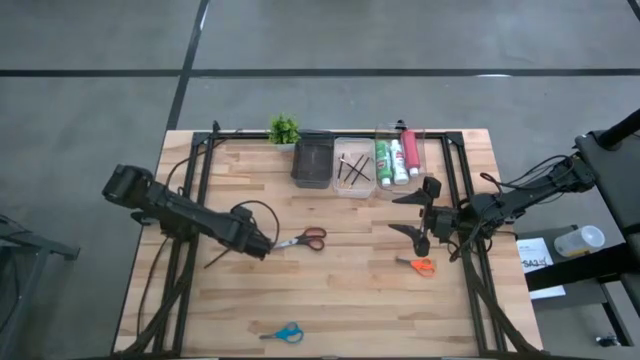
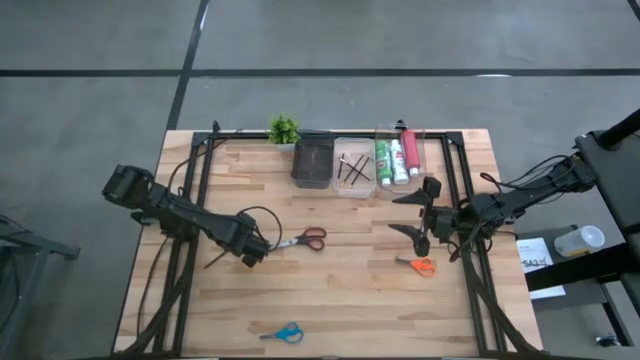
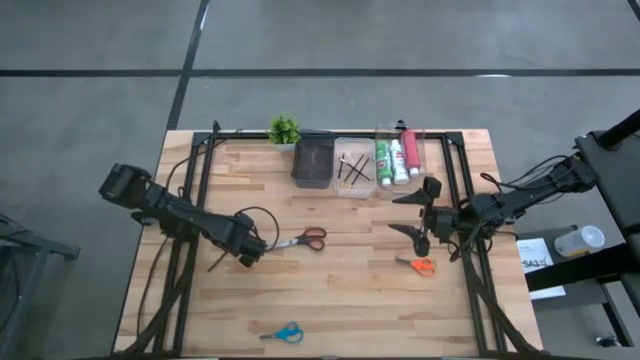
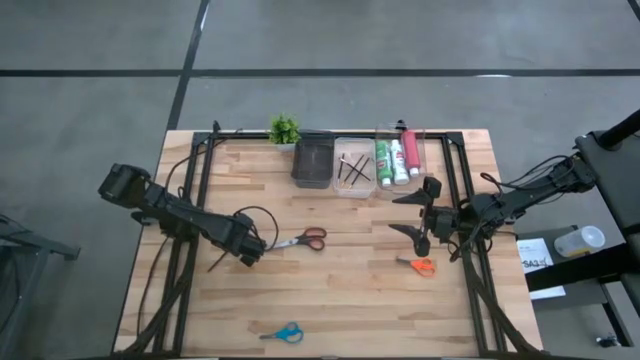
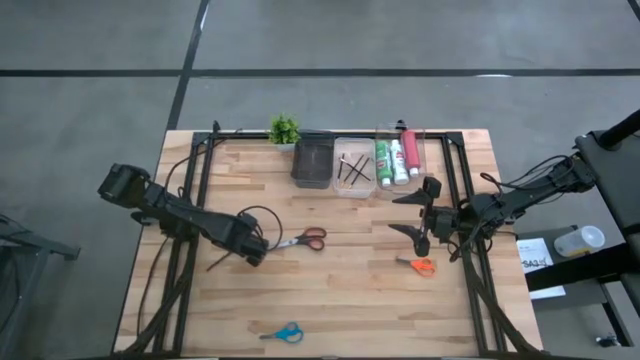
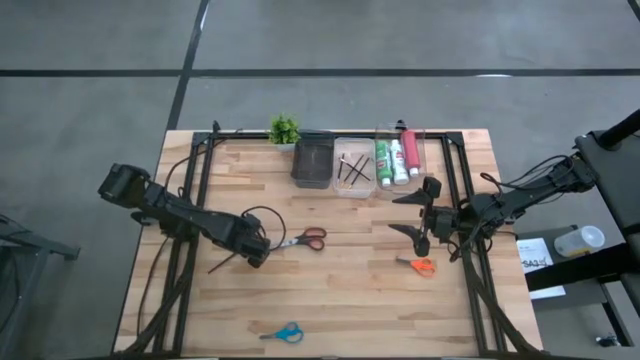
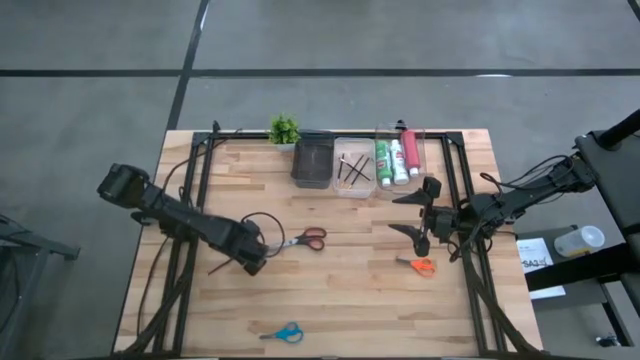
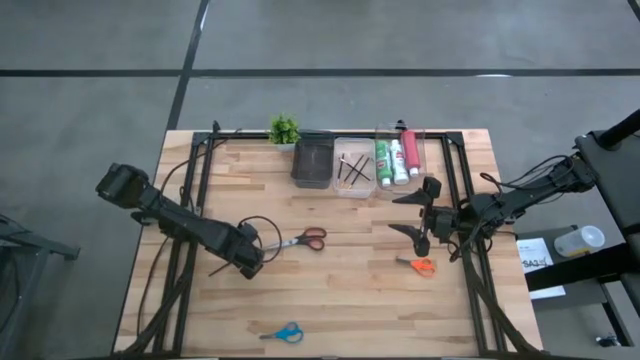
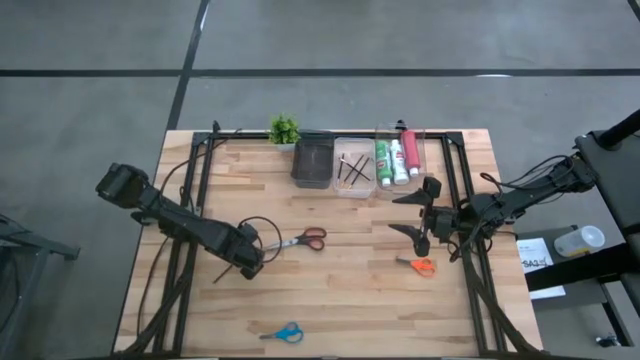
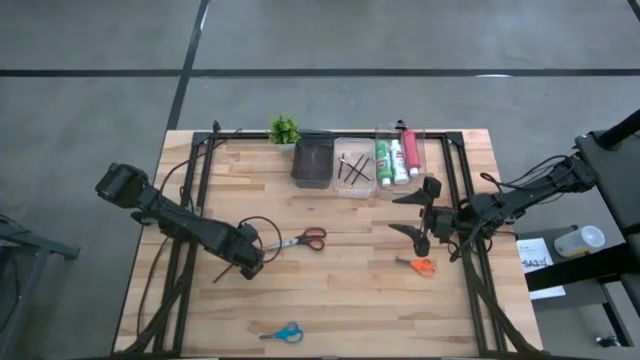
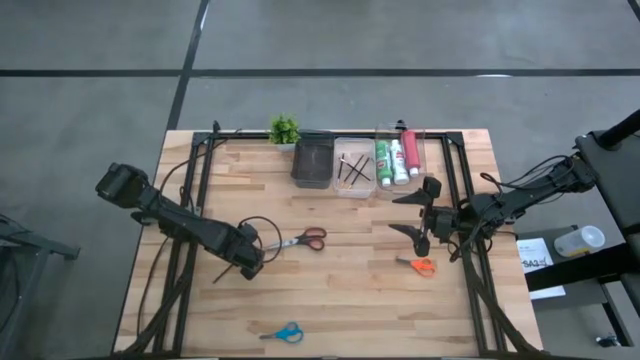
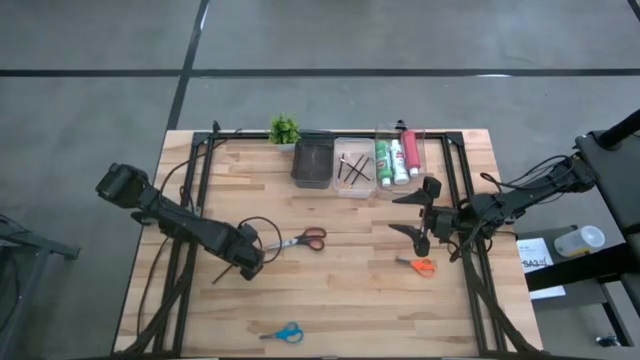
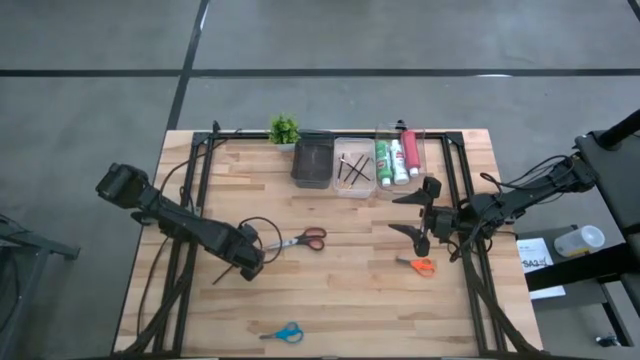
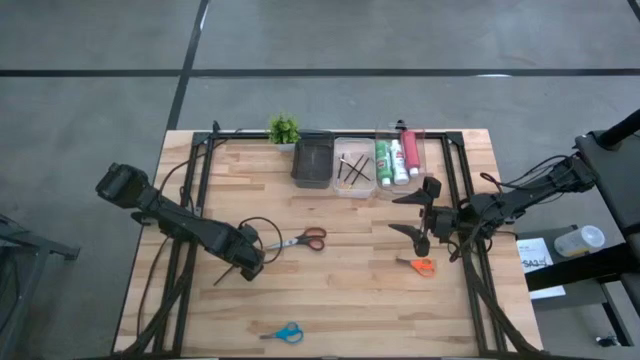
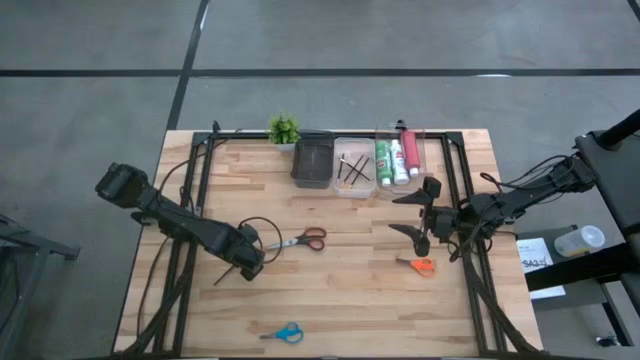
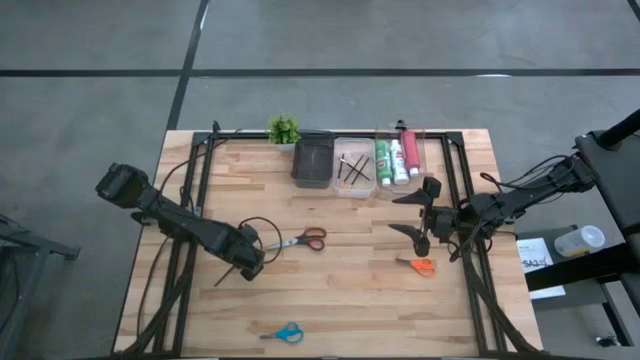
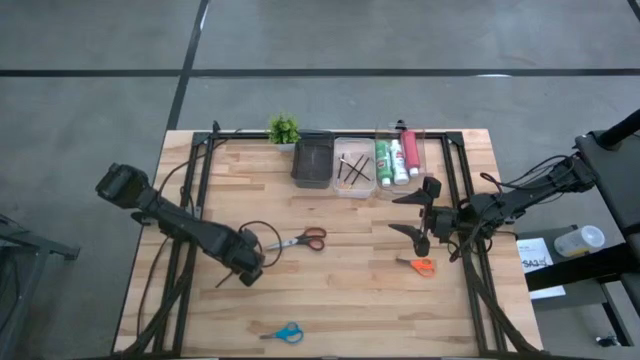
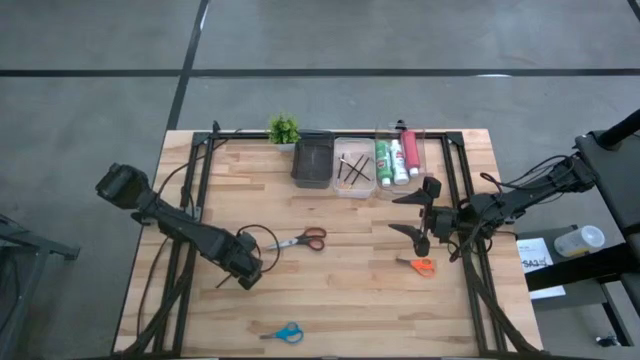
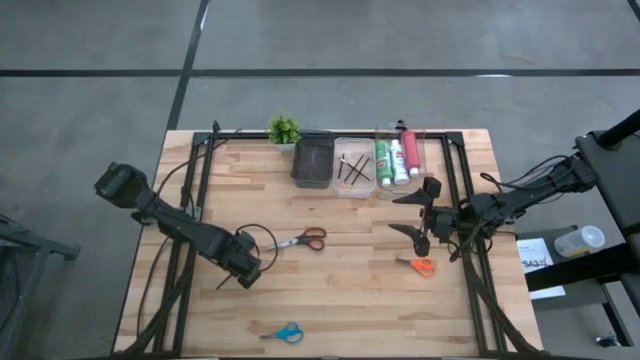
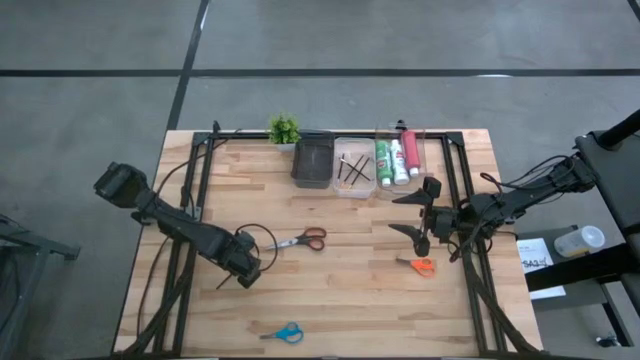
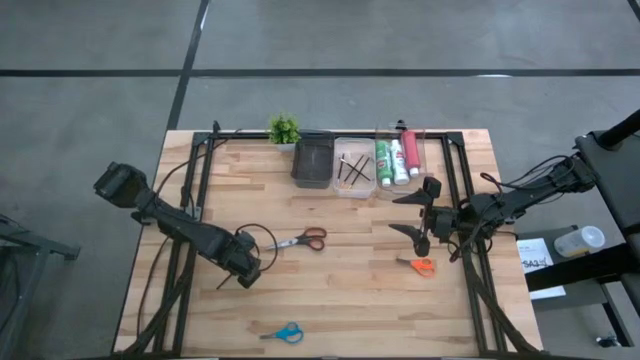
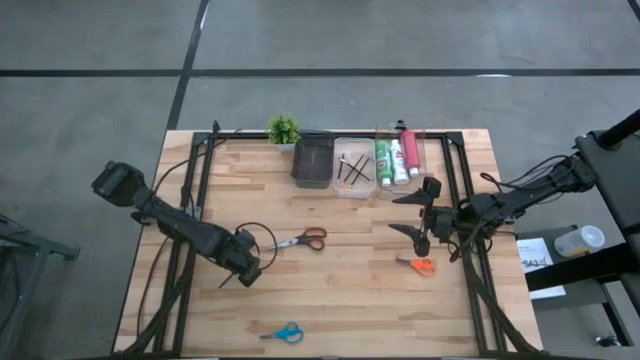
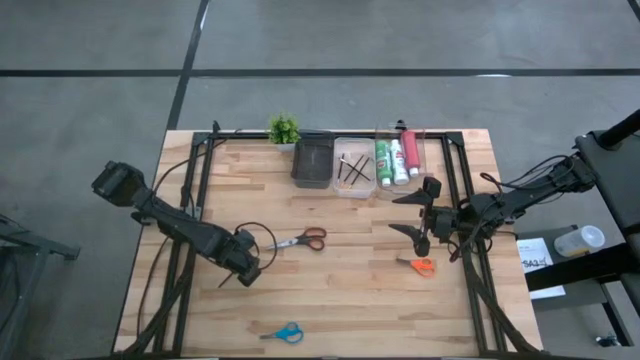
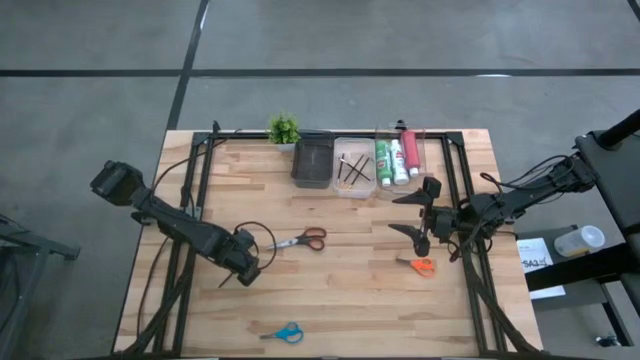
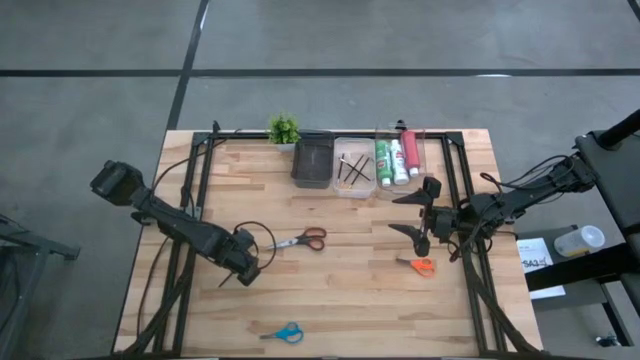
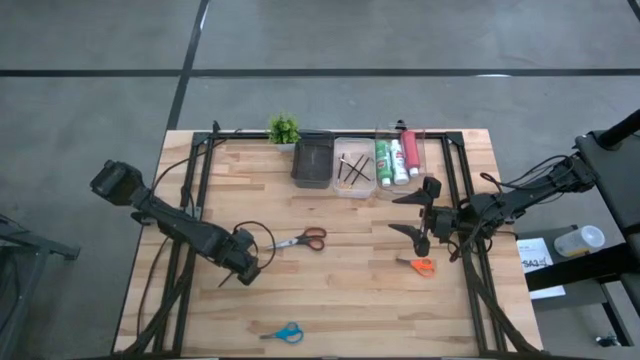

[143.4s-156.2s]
Task: Pick & Place Paint Supplies
Put the silver paint brush into the white transparent bin

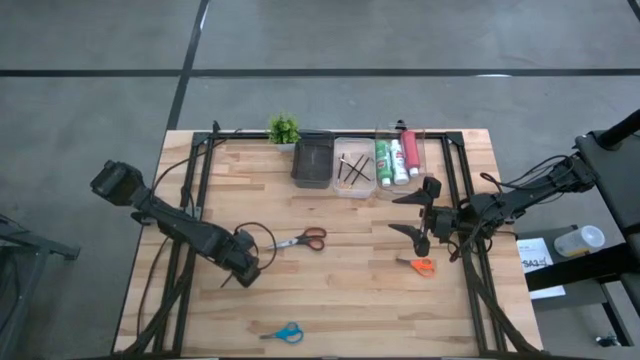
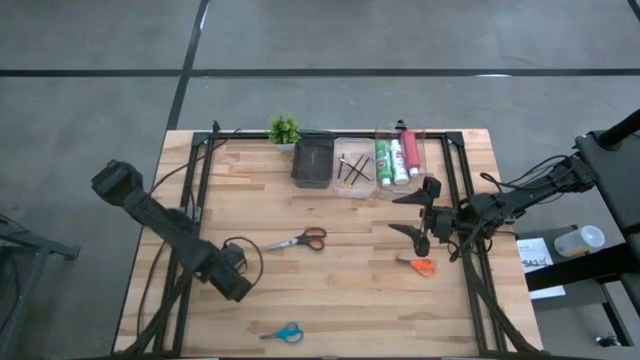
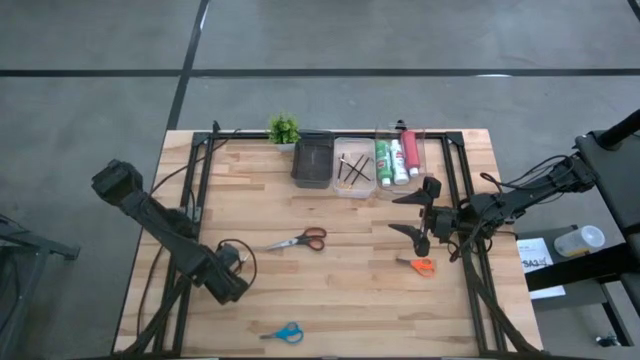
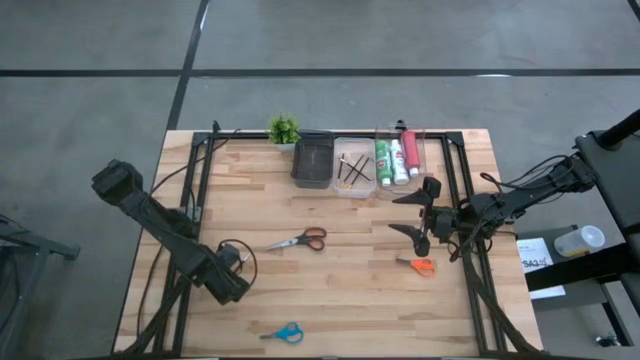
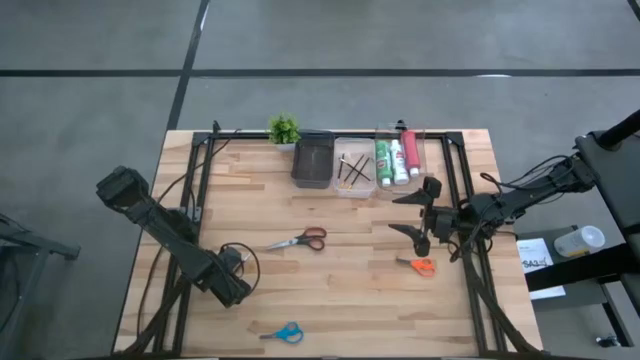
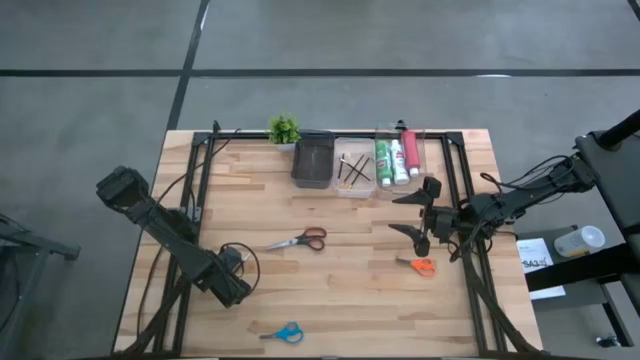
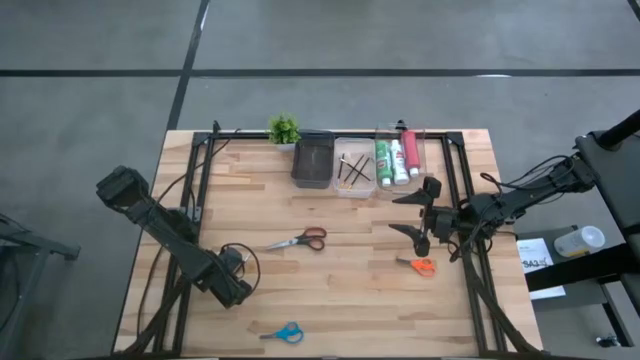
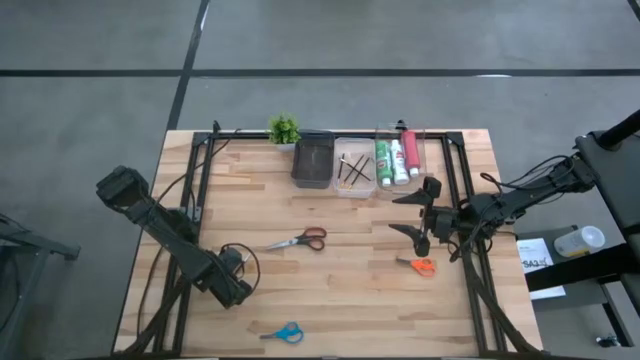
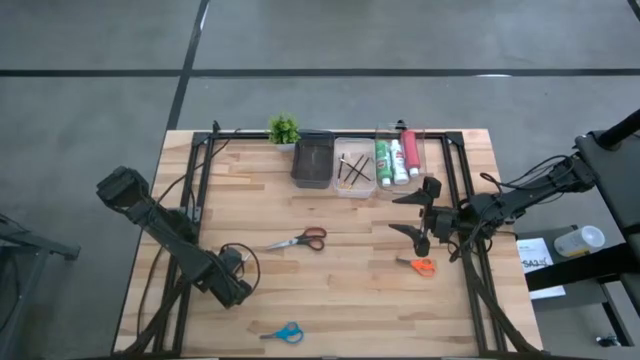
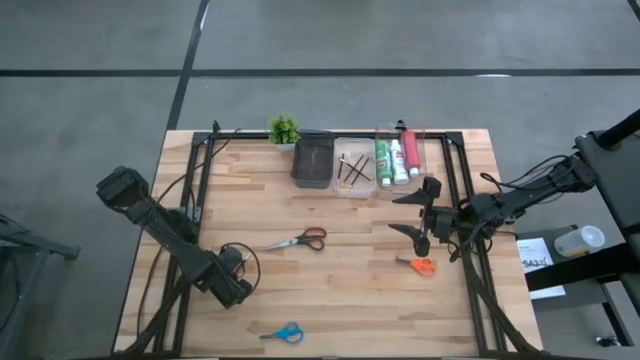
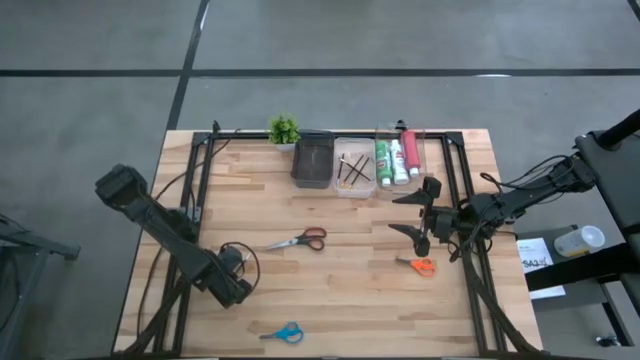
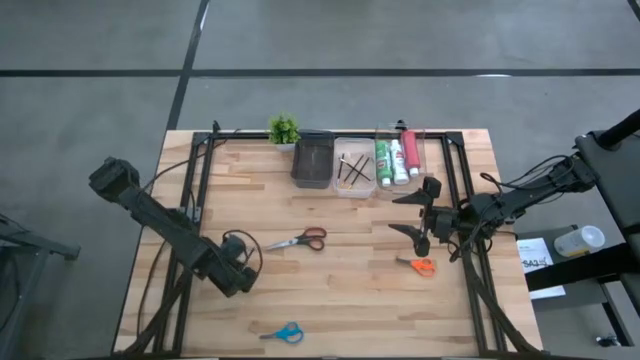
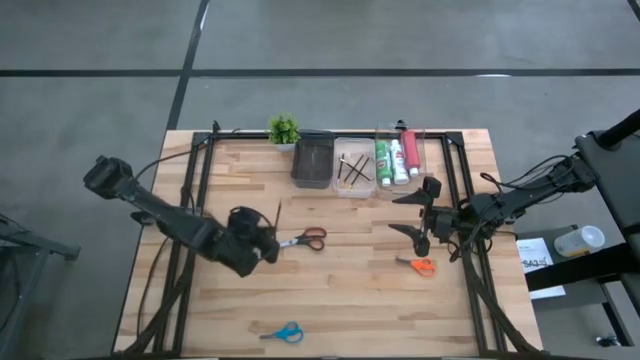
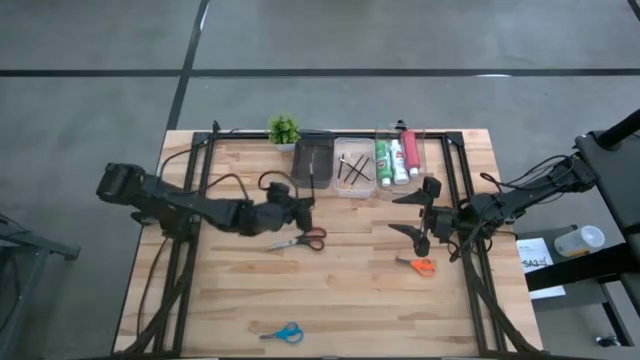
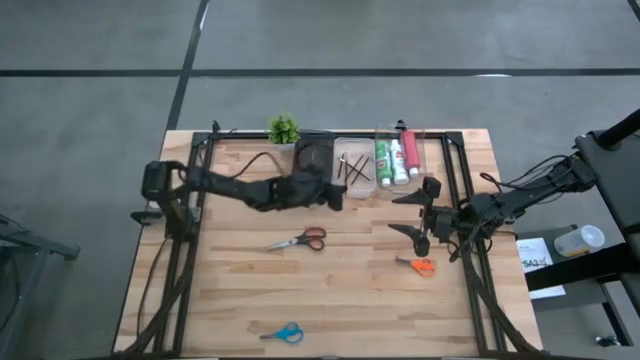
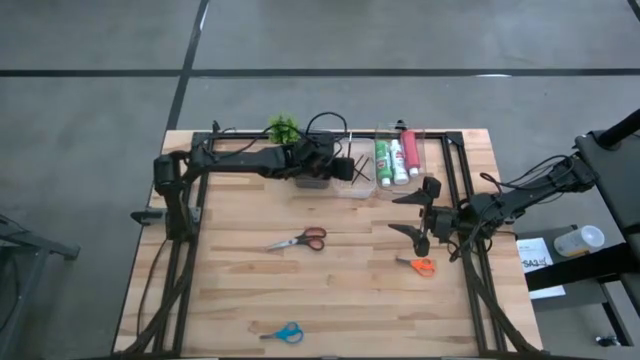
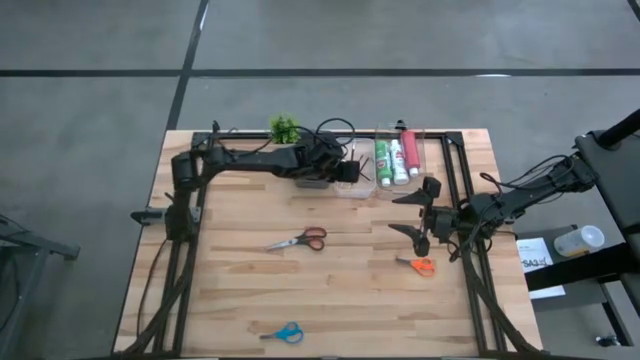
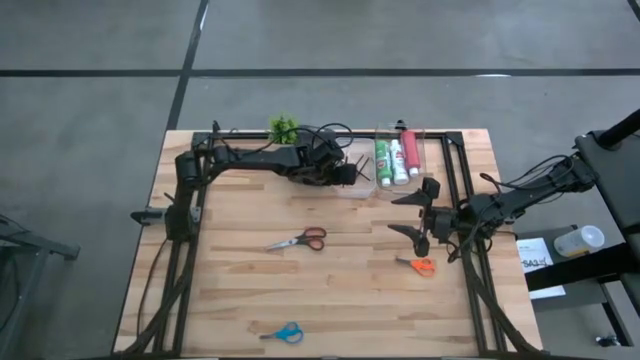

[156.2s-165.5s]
Put the silver paint brush into the white transparent bin
